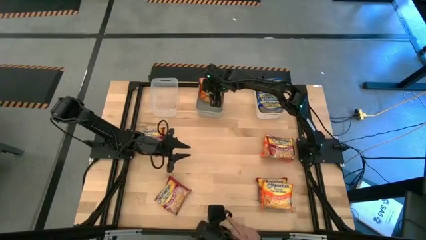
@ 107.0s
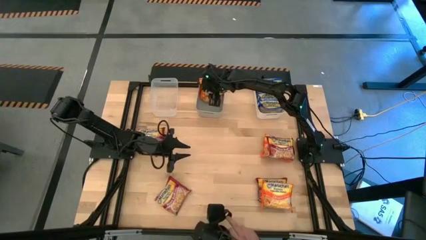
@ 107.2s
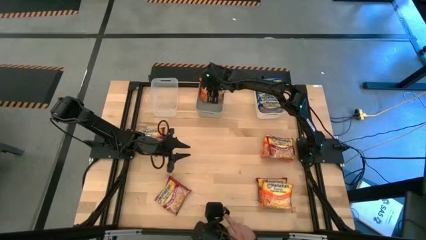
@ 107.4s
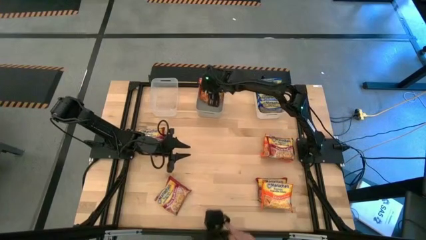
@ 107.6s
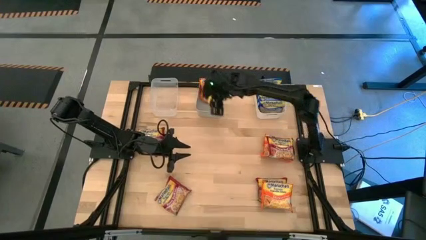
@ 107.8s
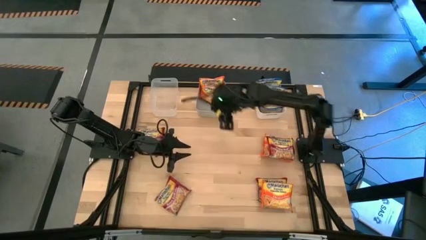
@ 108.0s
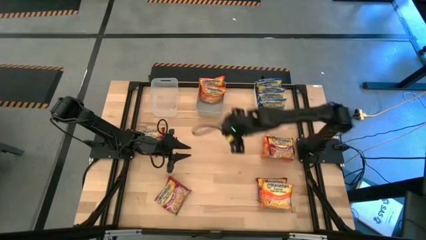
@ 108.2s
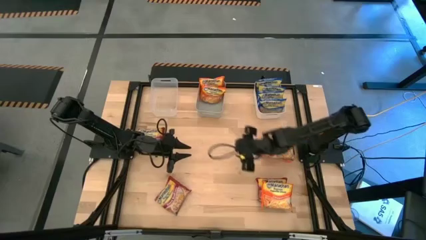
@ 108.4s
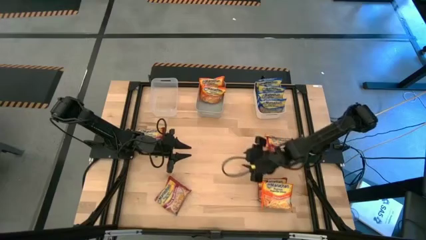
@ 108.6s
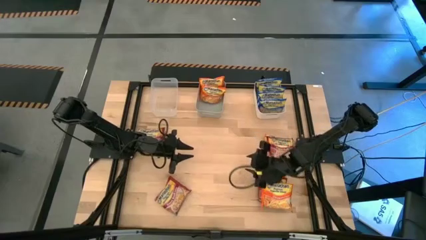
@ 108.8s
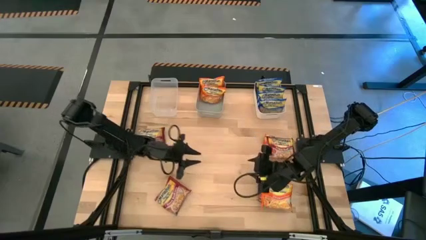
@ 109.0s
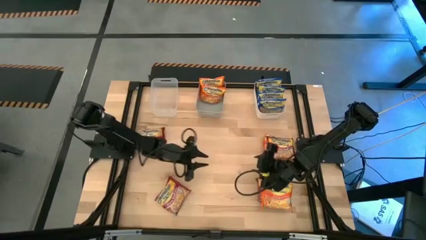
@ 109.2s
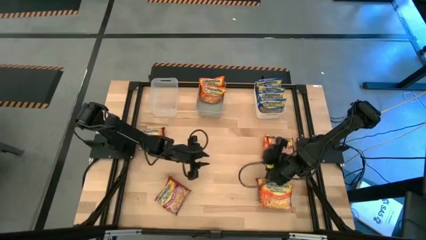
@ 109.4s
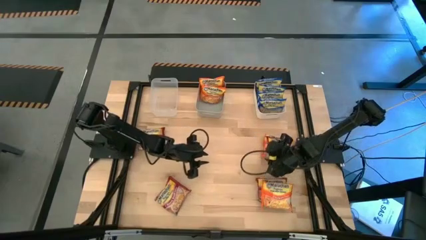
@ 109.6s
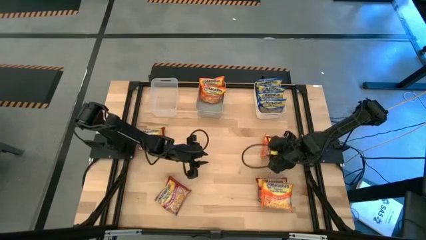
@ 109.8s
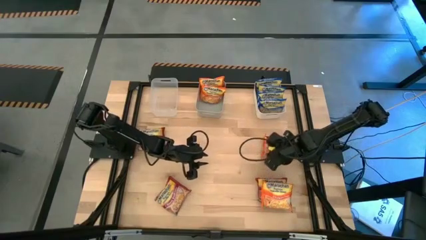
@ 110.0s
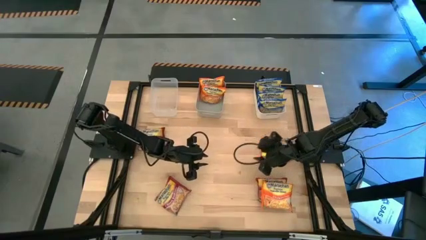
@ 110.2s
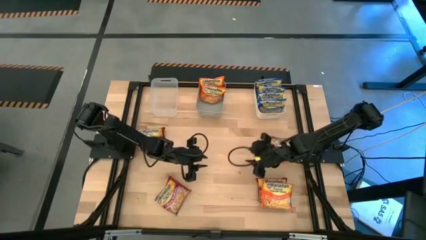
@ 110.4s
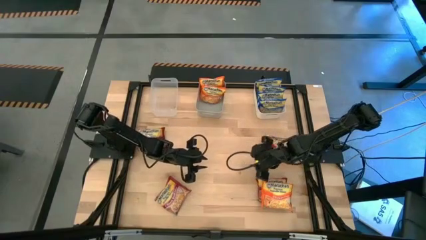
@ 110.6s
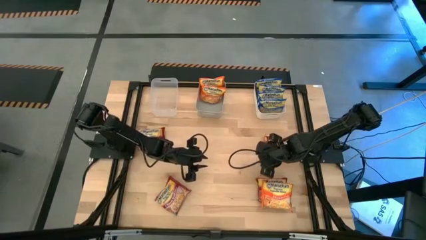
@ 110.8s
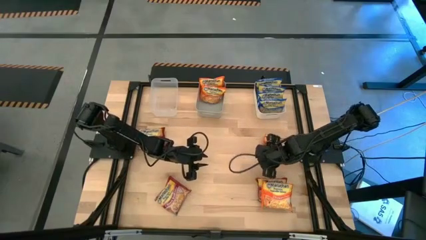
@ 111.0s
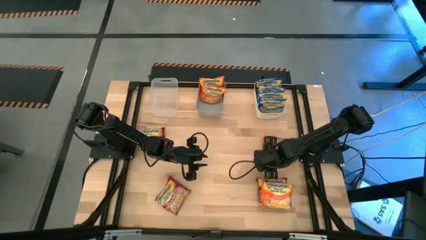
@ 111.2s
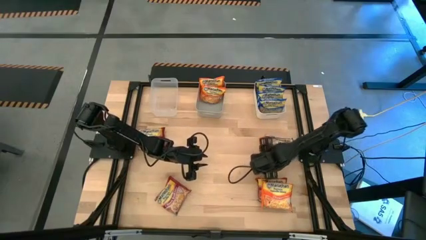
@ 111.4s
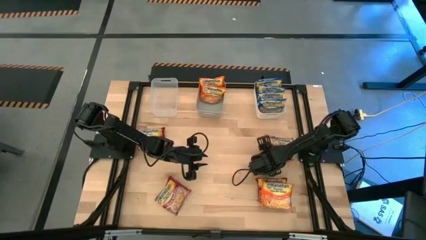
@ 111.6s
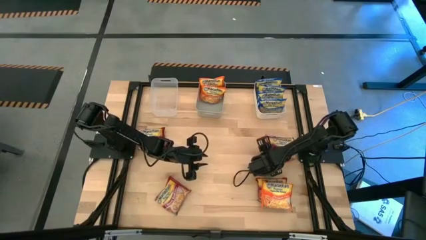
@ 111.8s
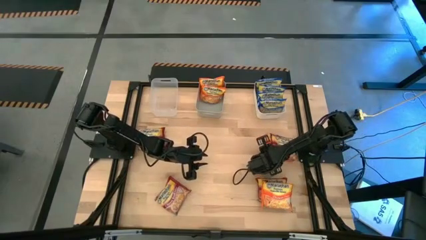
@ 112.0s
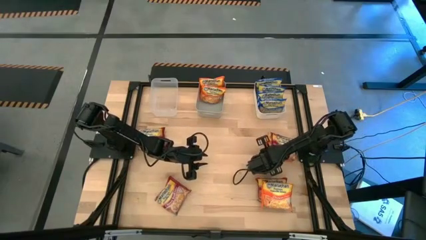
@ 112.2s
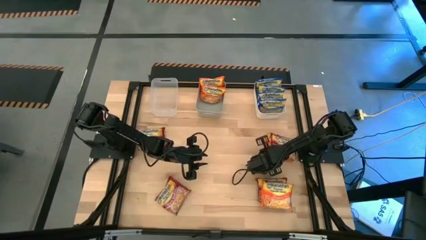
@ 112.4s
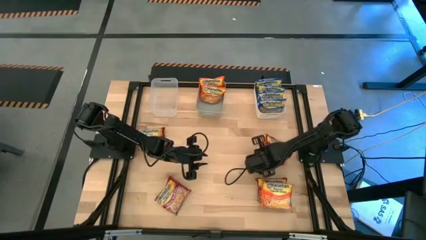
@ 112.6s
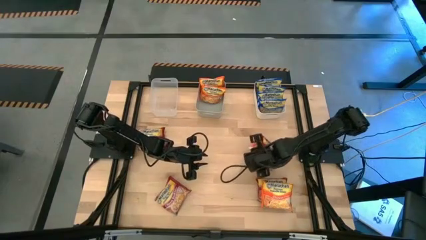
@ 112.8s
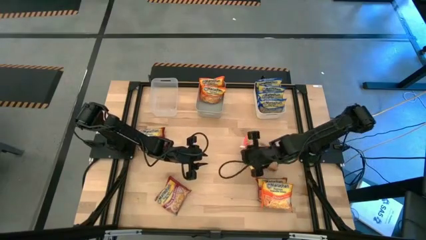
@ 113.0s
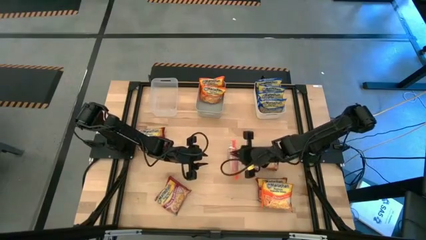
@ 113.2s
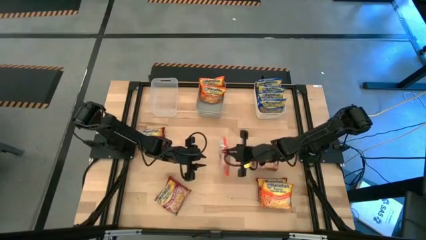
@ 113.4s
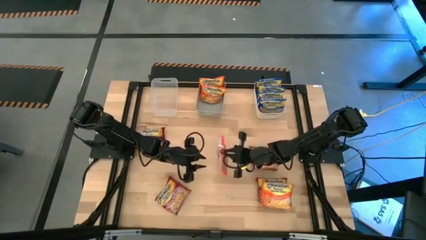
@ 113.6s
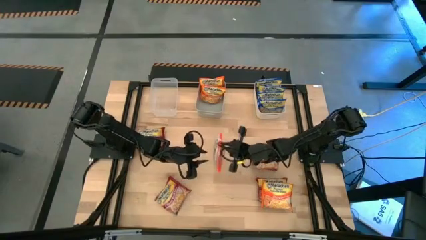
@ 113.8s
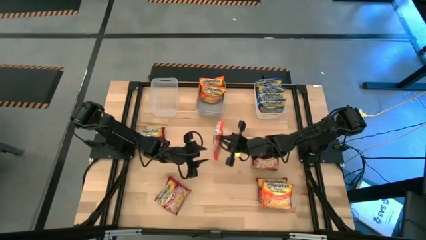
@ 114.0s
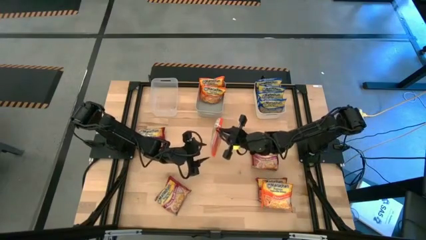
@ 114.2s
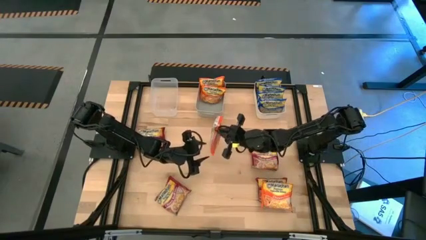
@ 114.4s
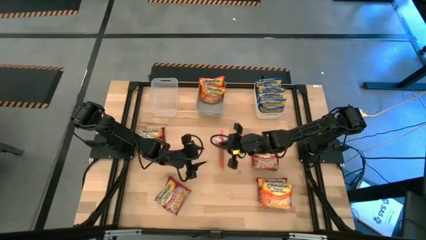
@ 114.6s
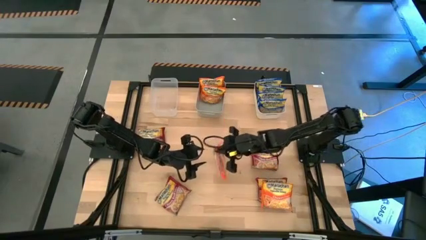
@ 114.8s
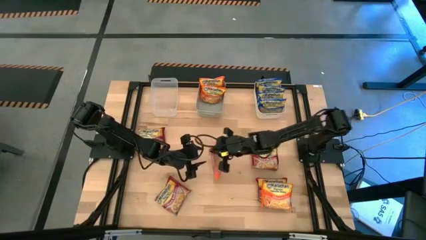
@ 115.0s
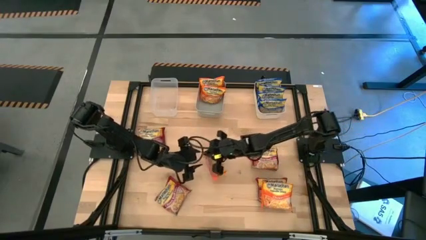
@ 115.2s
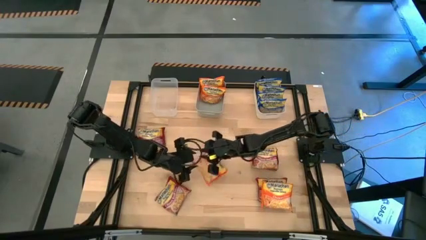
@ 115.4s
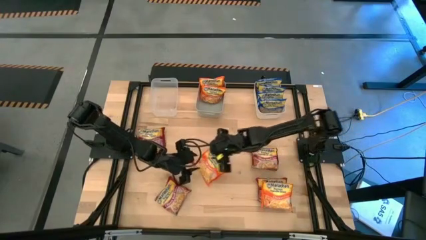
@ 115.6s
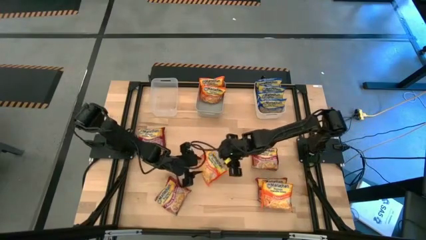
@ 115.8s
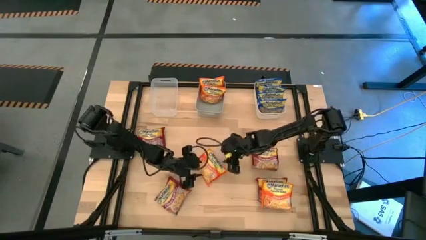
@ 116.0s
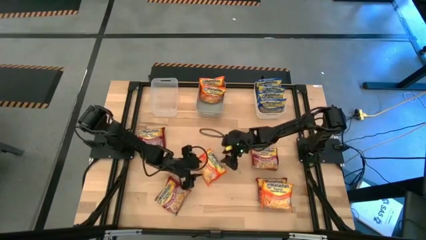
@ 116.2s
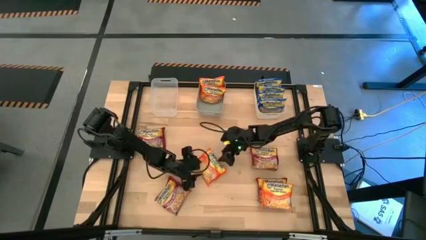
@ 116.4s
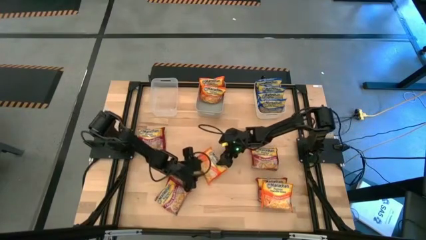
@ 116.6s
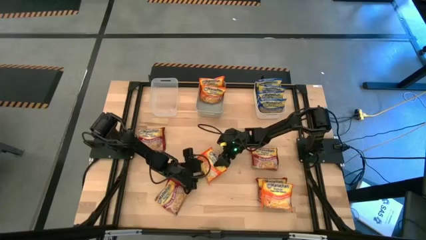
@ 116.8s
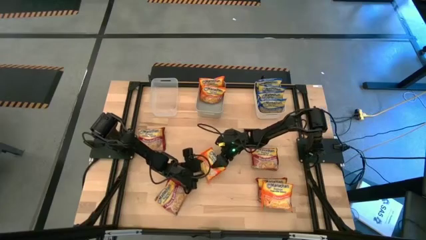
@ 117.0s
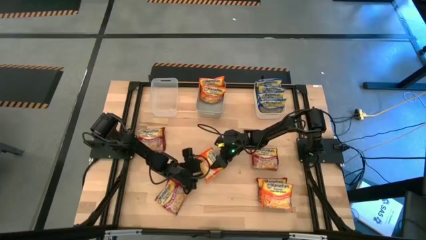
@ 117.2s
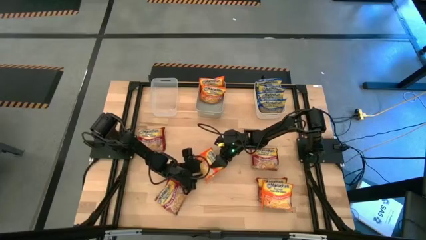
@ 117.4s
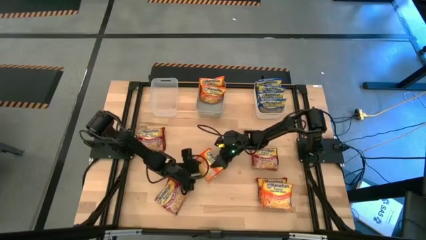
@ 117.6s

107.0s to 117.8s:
Task: Sort Maruchan noodles
Put the orange noodle pack into the gray bin

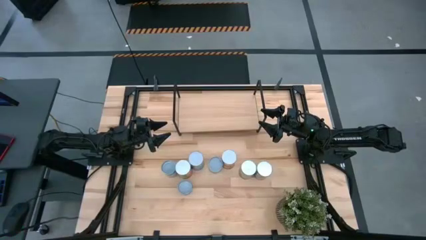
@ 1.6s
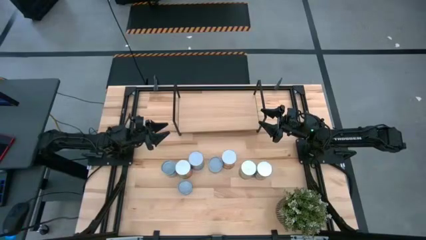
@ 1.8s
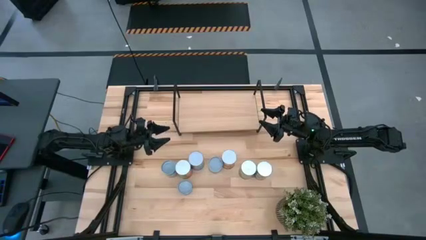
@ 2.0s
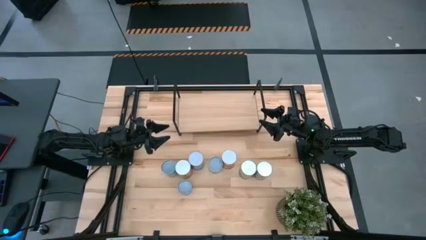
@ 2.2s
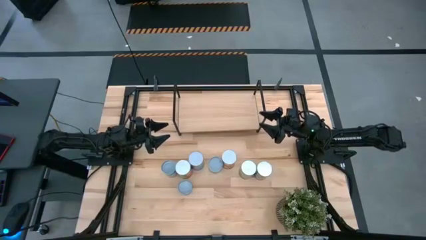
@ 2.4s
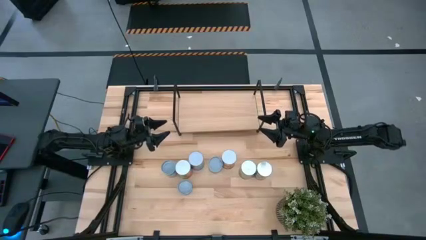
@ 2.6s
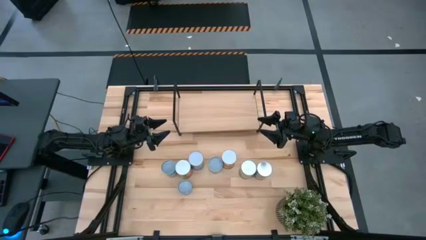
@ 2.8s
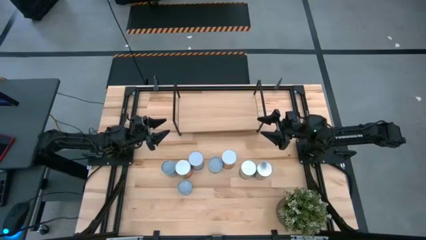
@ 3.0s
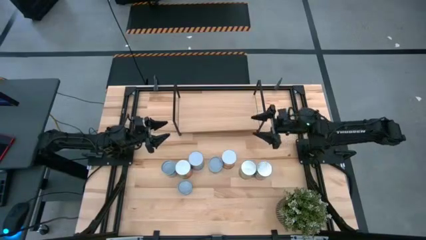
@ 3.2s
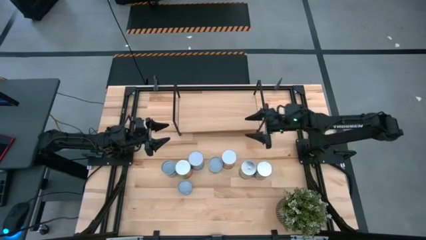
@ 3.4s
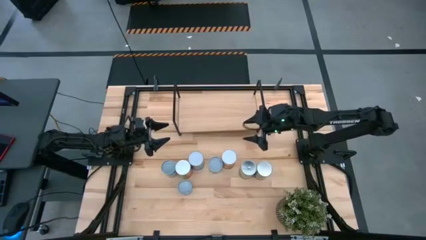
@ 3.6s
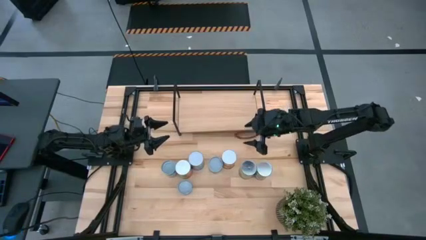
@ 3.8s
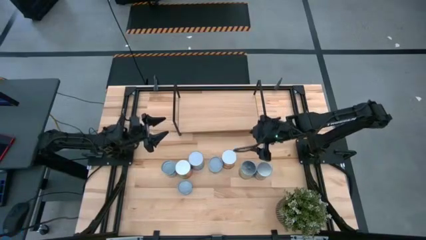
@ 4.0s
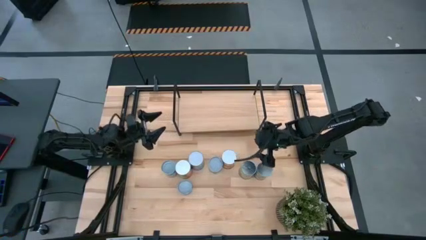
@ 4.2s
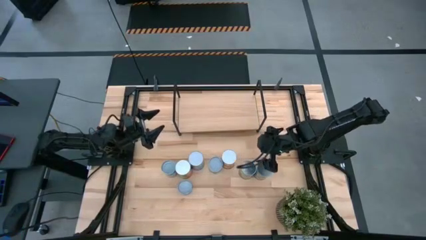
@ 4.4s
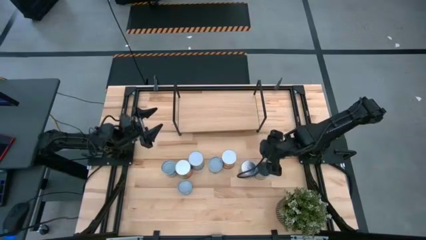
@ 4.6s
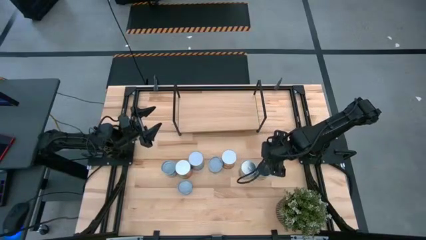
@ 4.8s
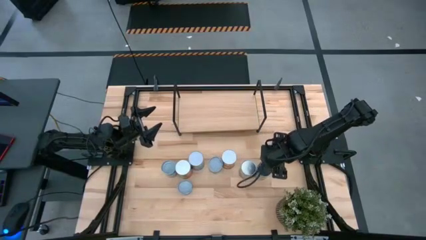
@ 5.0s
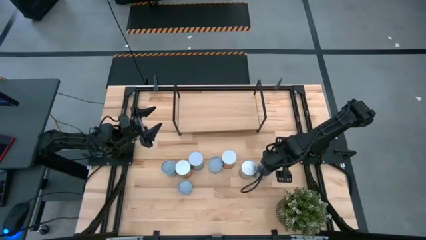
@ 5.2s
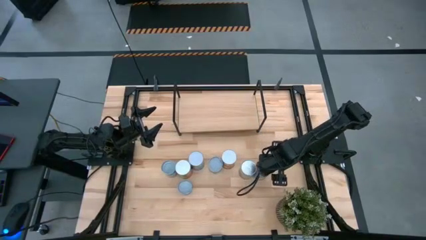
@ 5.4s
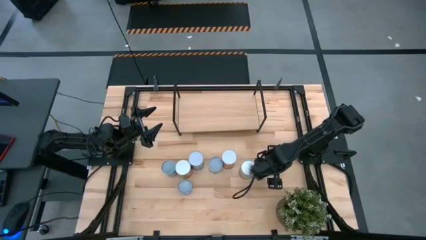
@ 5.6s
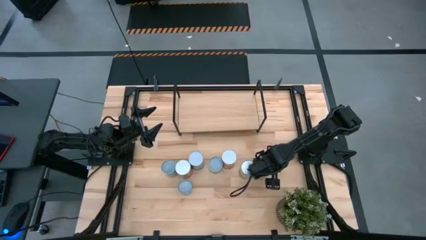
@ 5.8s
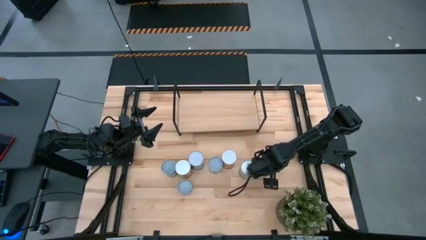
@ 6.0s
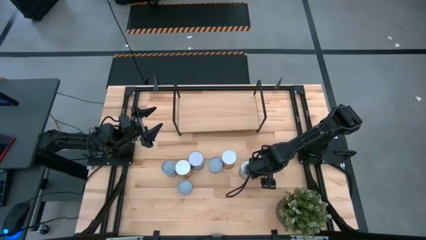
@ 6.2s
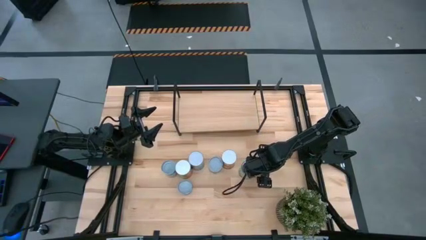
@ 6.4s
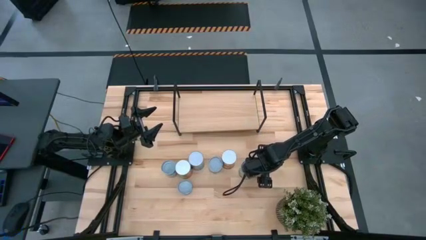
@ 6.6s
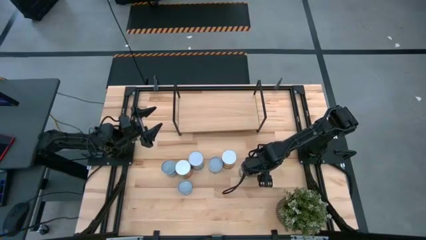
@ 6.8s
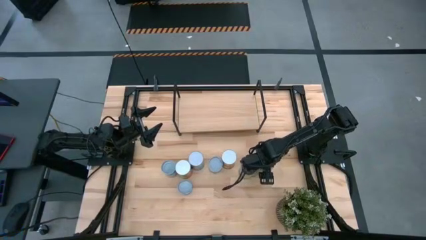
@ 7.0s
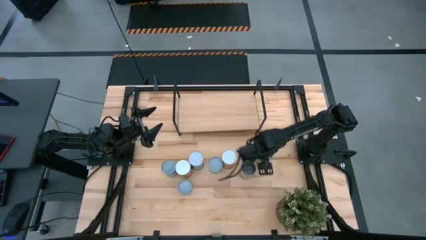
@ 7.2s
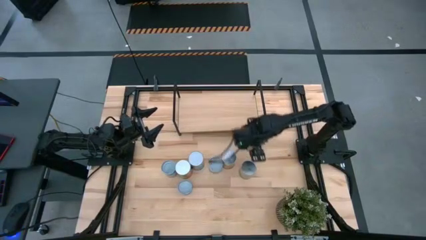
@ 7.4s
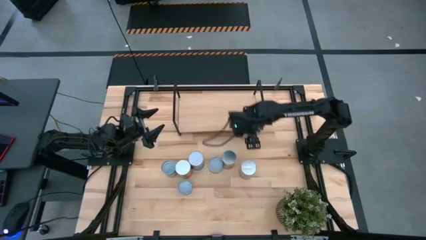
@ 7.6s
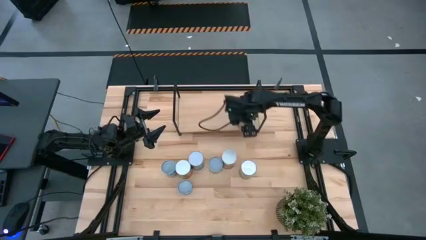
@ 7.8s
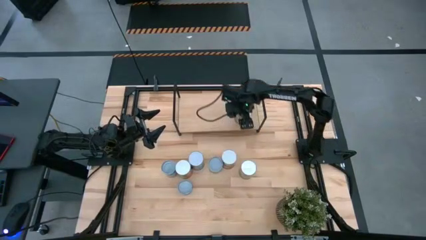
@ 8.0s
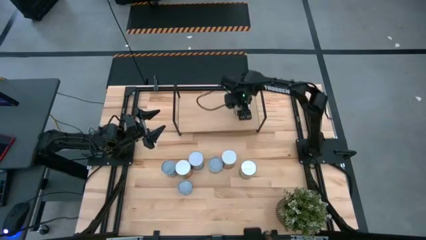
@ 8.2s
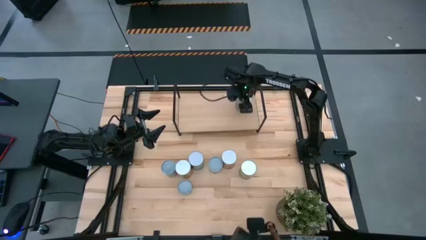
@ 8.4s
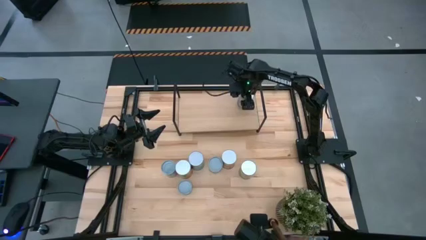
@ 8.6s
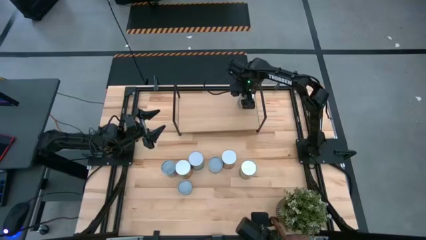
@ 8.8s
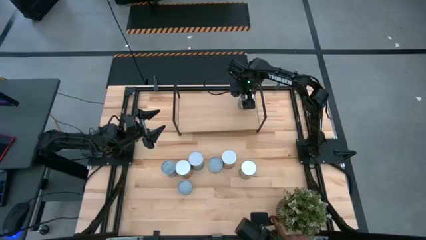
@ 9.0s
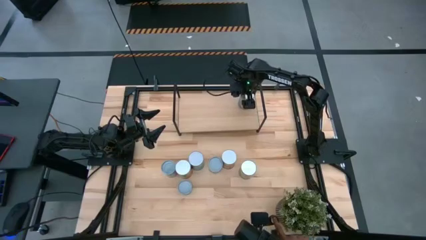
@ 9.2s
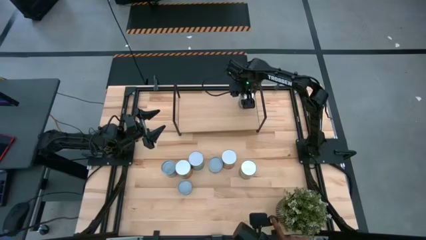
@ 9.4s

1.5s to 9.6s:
Task: Pick and place cans onto a shelf
Put the canned peaches on the shelf
